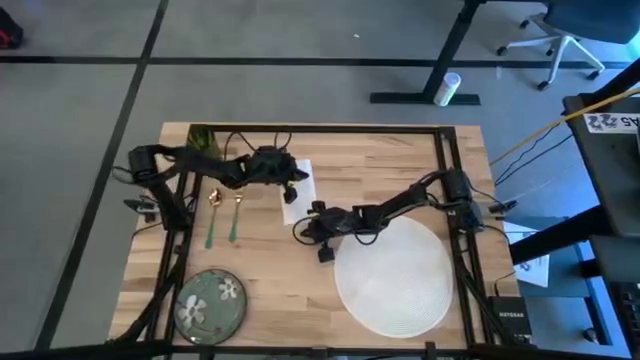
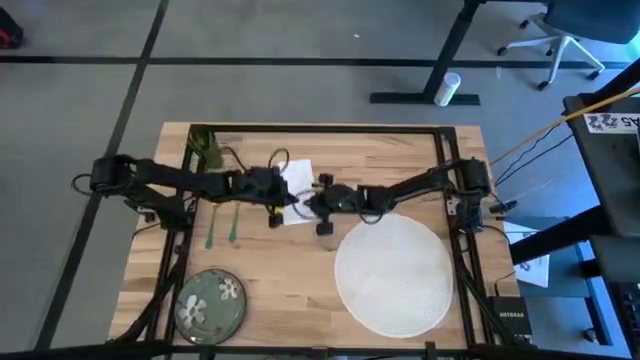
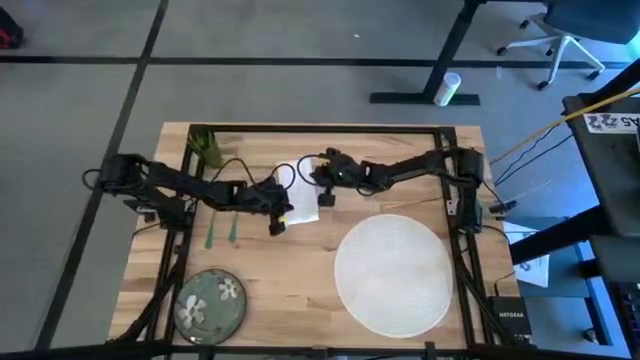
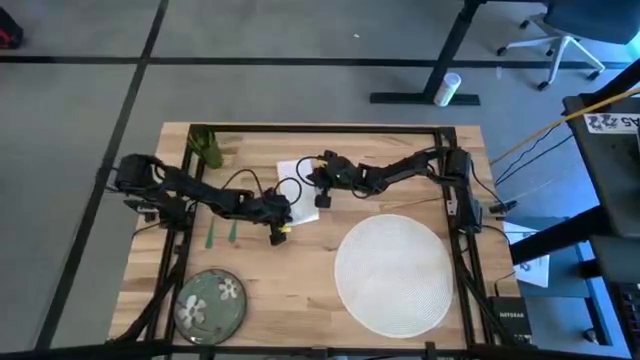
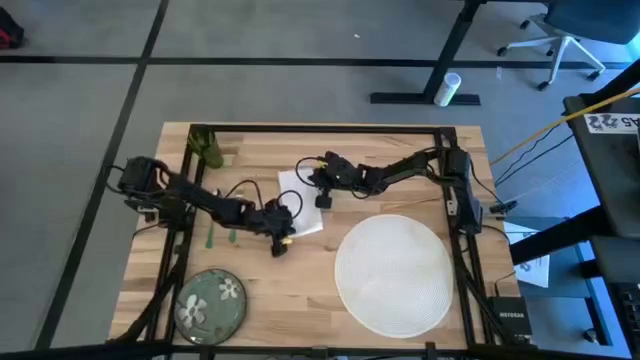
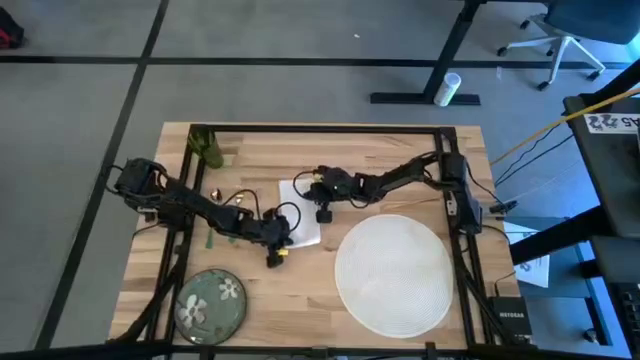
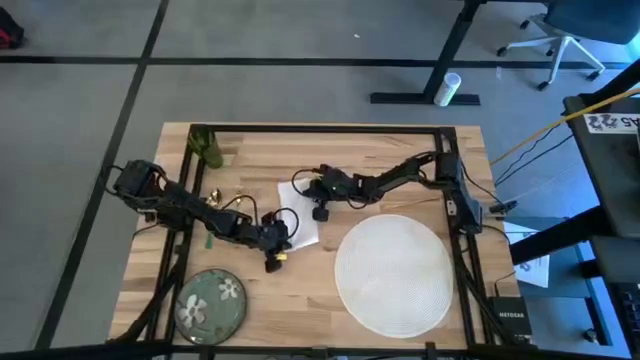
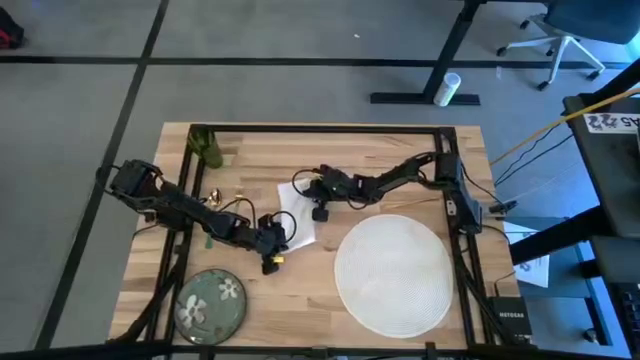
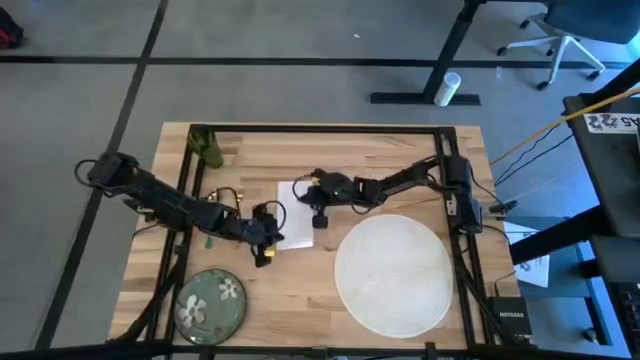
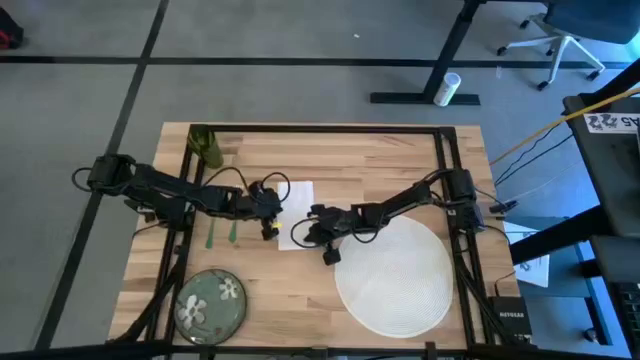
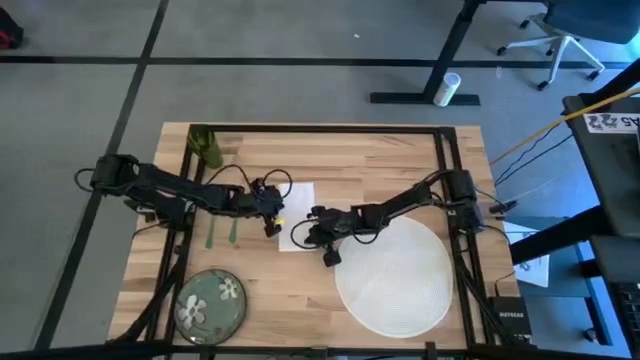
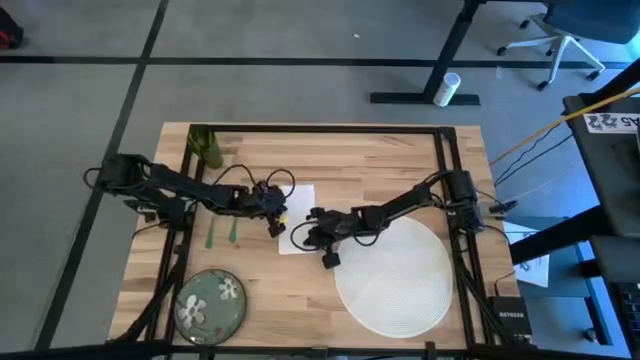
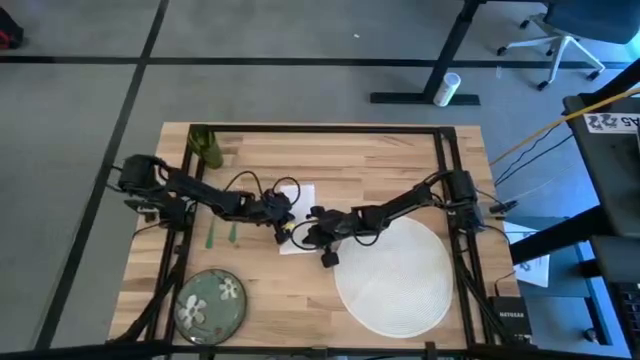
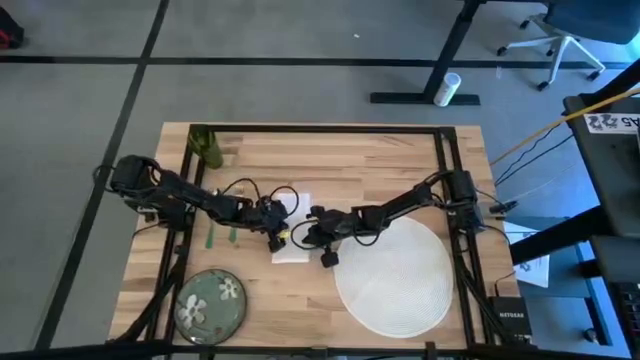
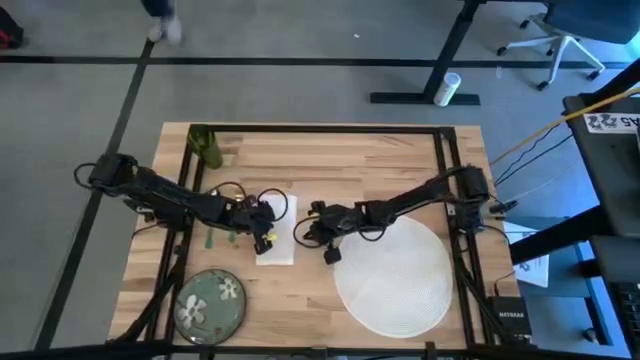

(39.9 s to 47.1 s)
Task: Set table place
Move the white table napkin to the right of the green fork

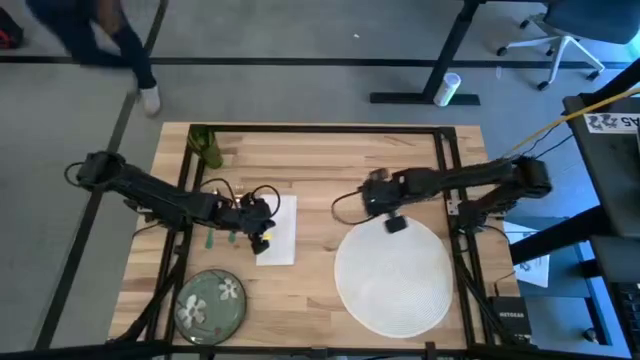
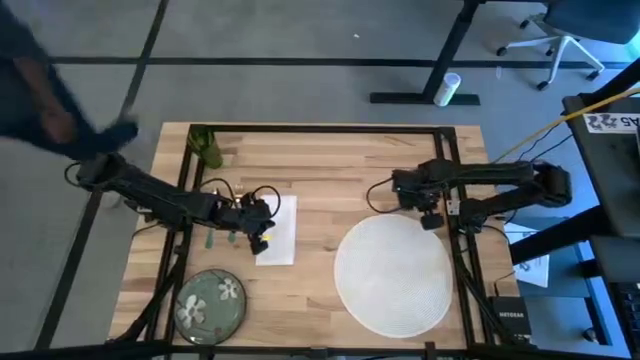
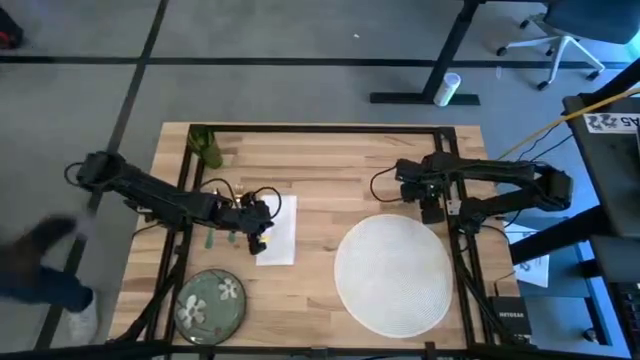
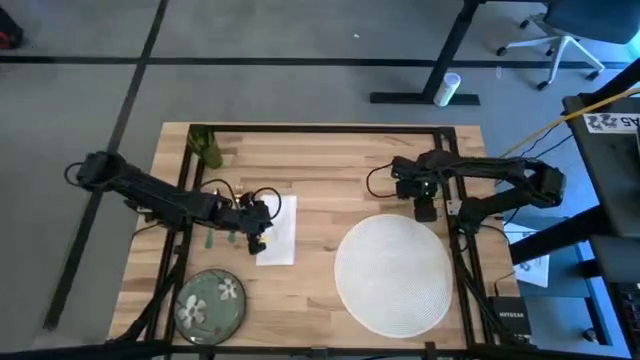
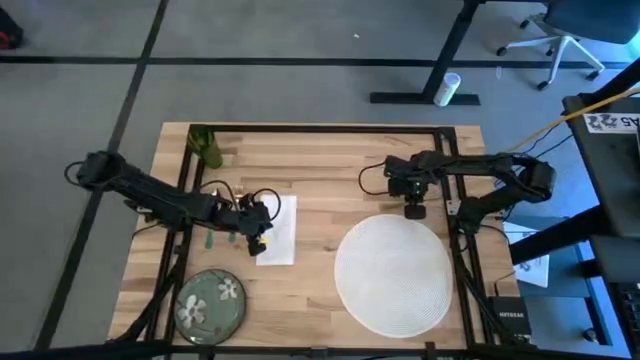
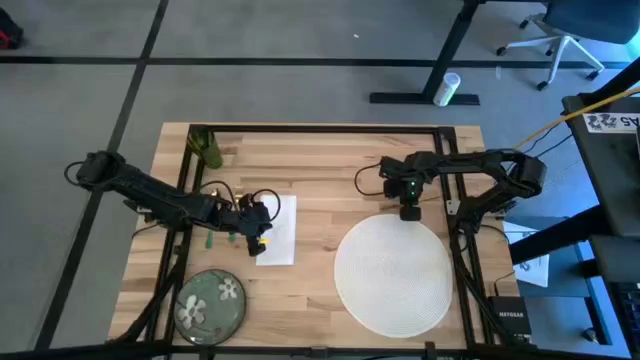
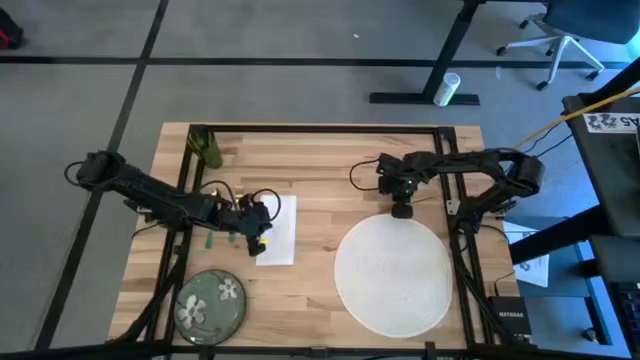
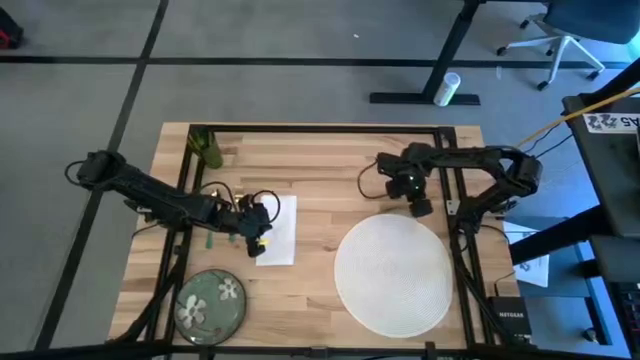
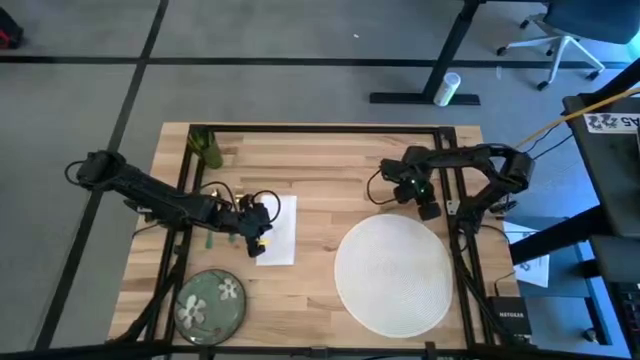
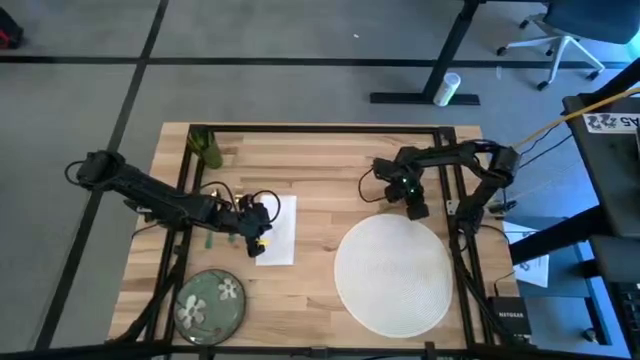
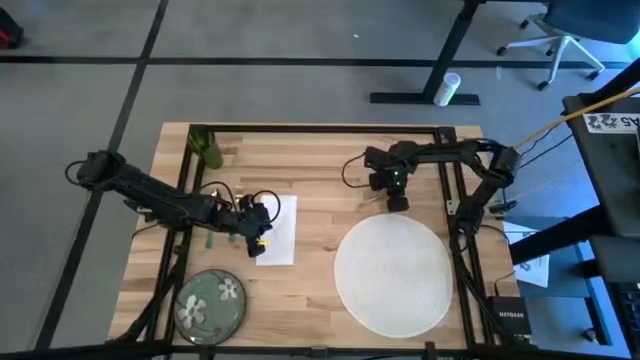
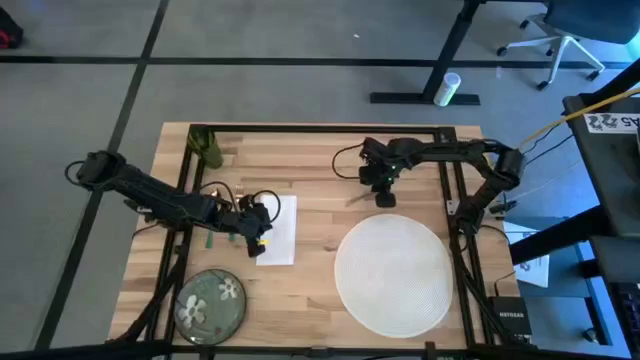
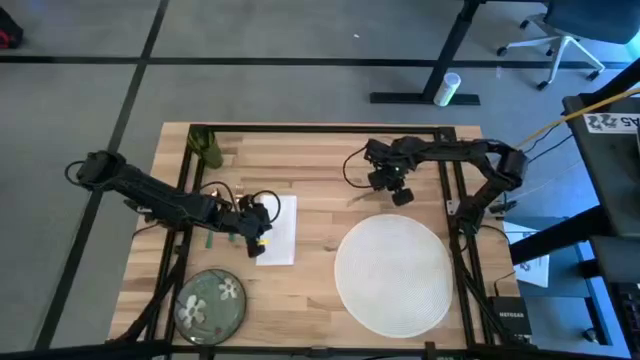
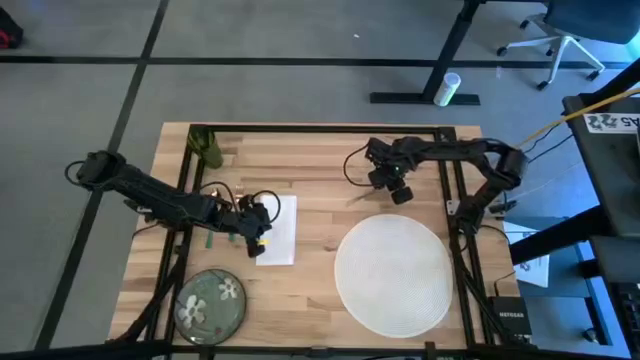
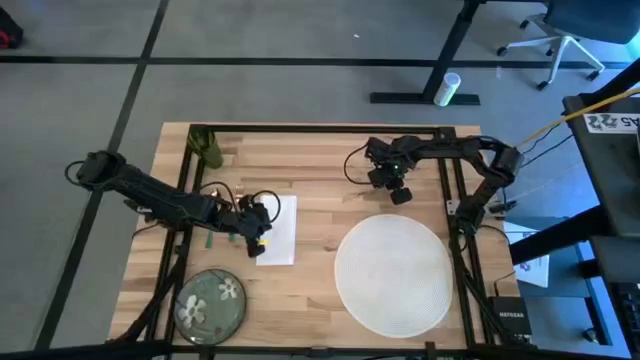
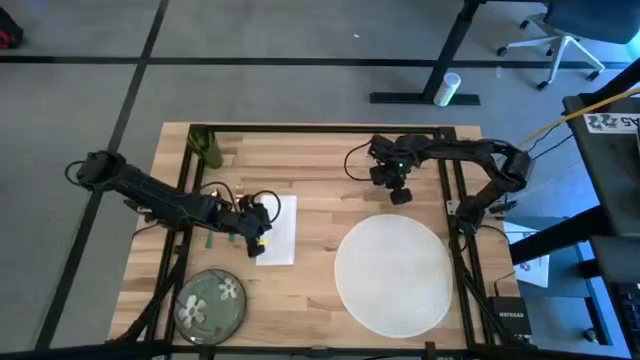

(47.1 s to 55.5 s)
Put the gold table knife on the white table mat

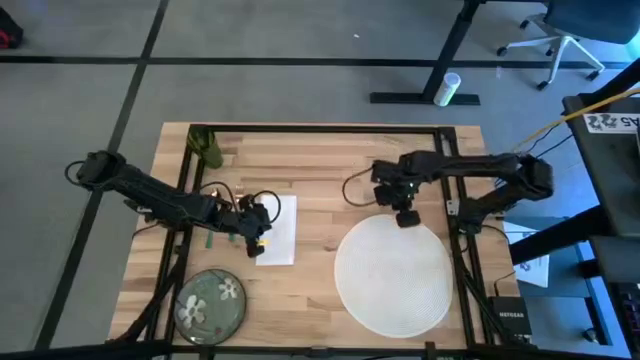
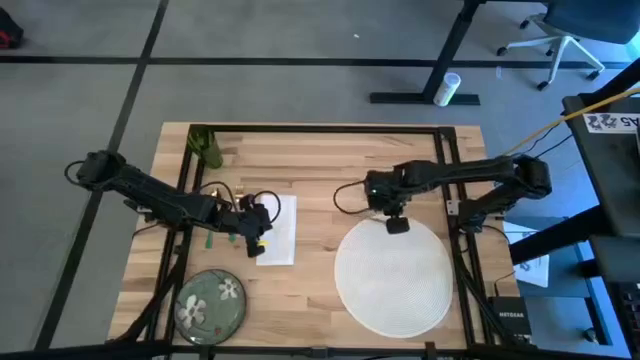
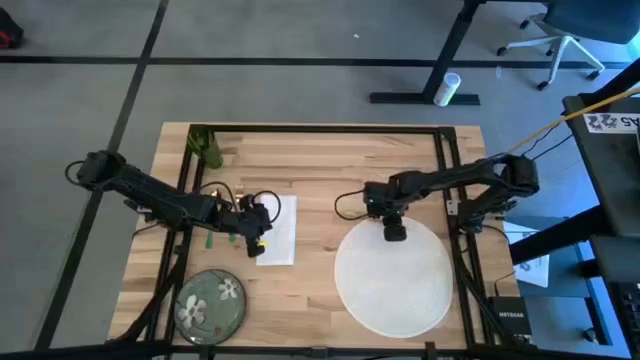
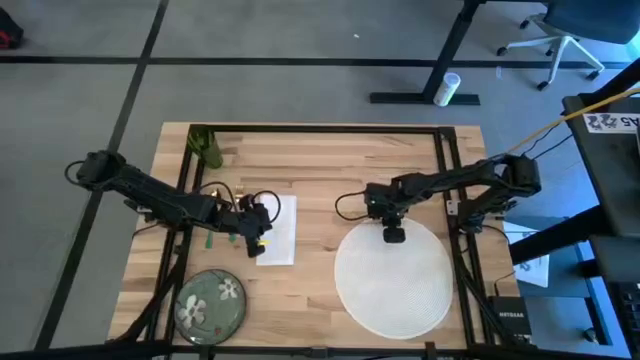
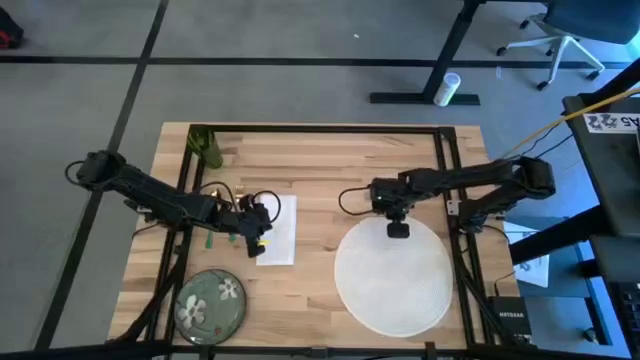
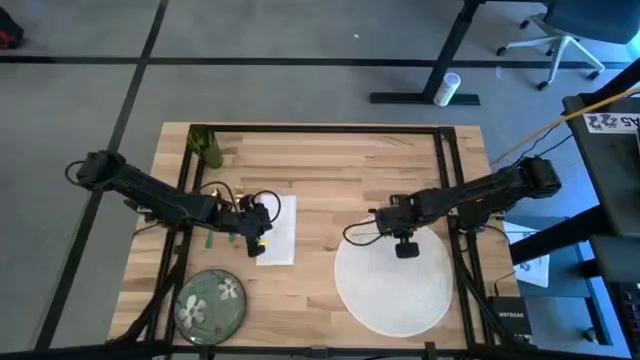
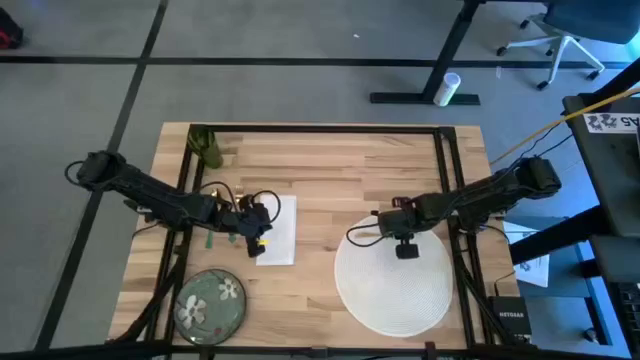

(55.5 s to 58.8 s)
Put the gold table knife on the white table mat

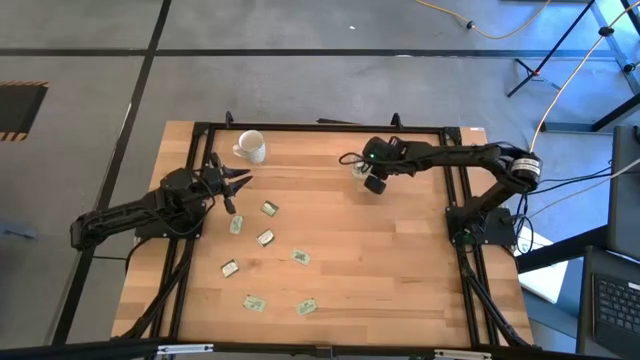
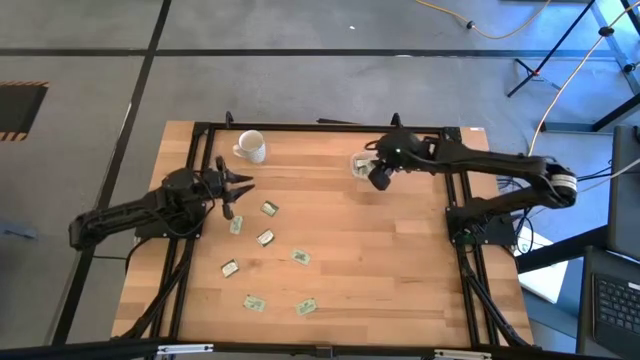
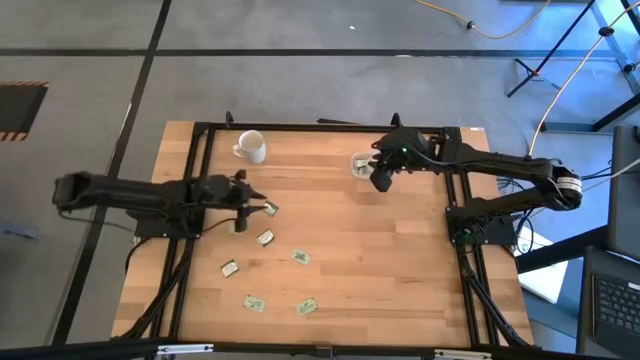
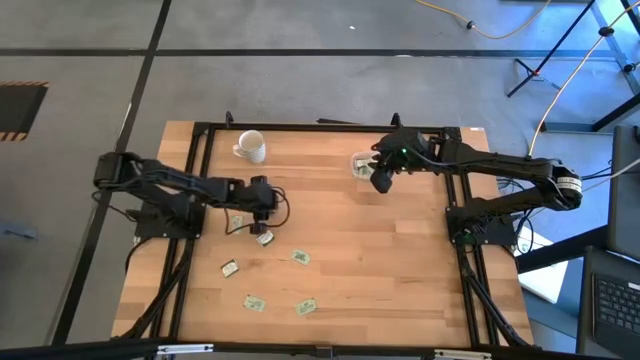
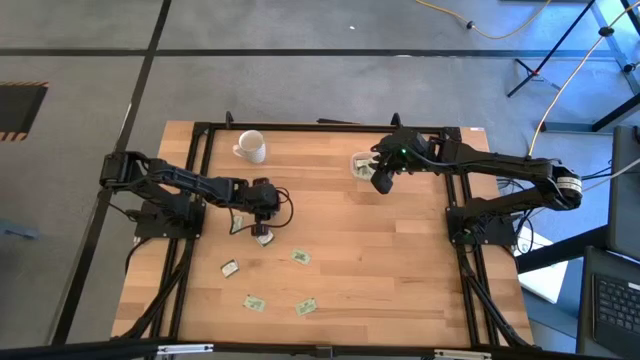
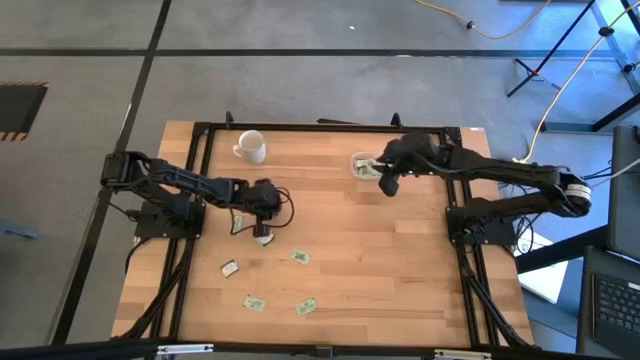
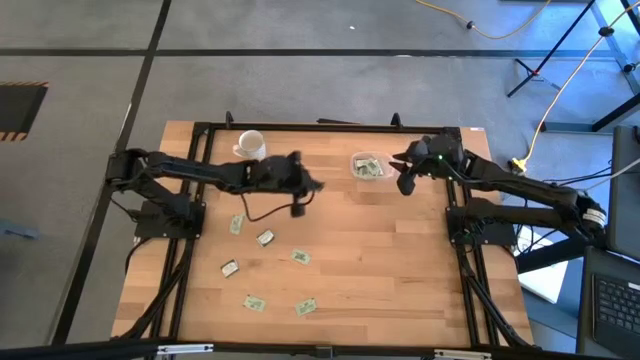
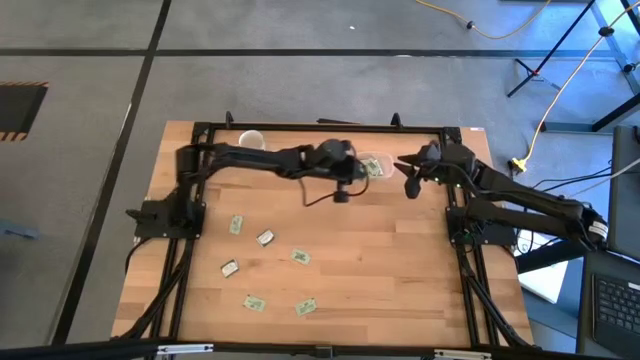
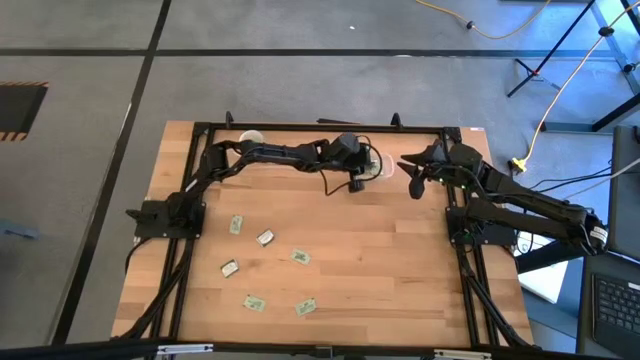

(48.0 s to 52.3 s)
Task: Pick and place items into bin
Put the truvia packet into the transparent bin
